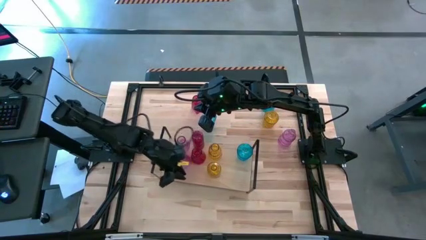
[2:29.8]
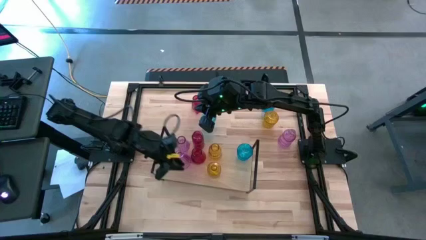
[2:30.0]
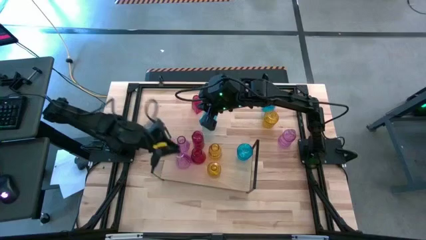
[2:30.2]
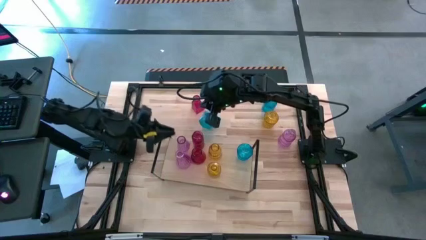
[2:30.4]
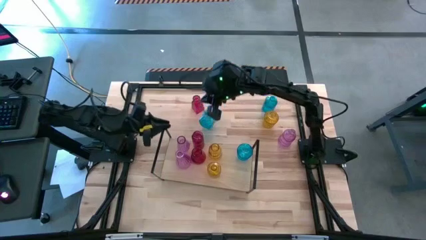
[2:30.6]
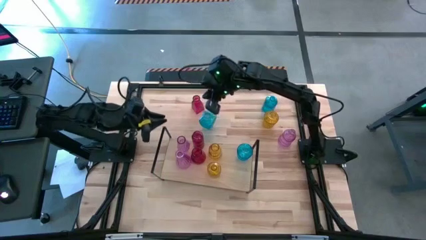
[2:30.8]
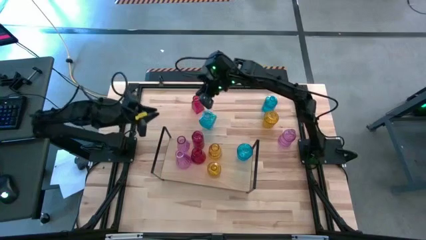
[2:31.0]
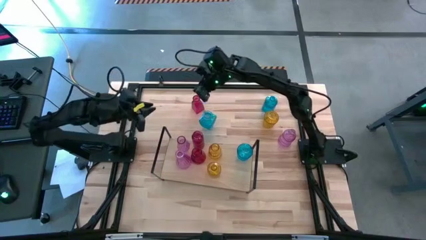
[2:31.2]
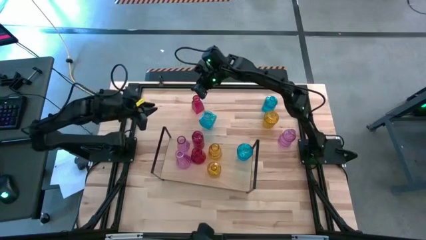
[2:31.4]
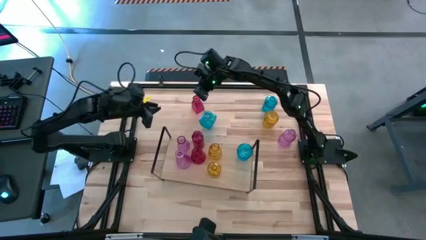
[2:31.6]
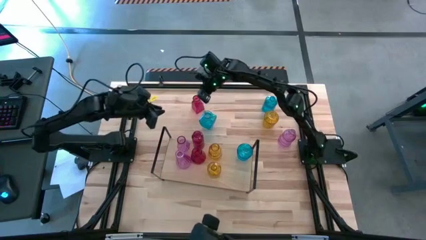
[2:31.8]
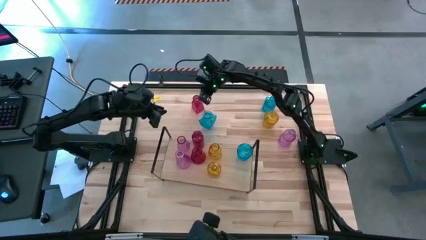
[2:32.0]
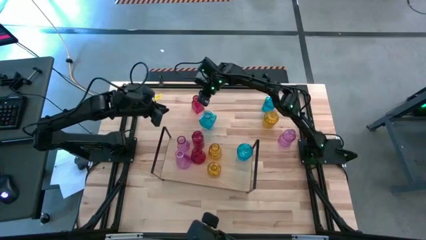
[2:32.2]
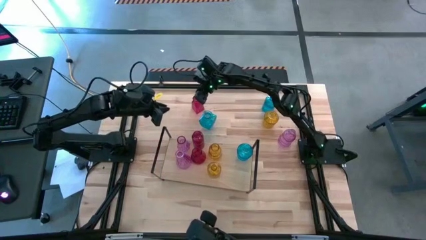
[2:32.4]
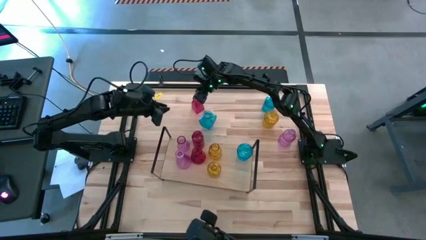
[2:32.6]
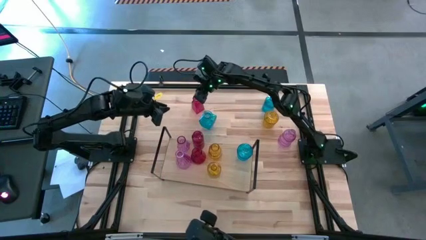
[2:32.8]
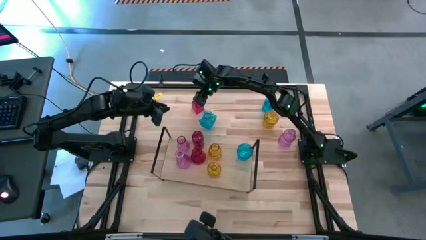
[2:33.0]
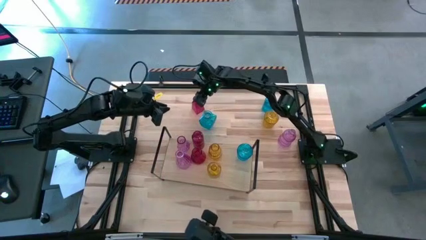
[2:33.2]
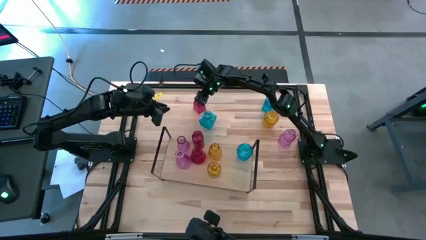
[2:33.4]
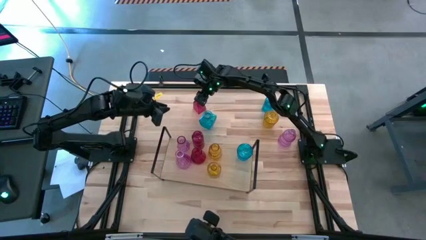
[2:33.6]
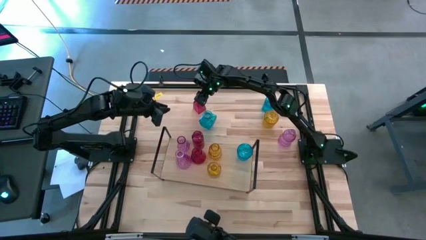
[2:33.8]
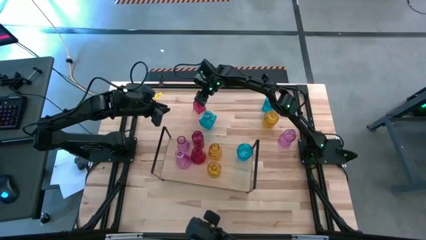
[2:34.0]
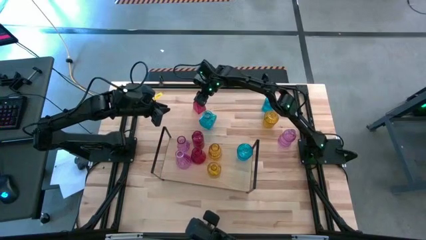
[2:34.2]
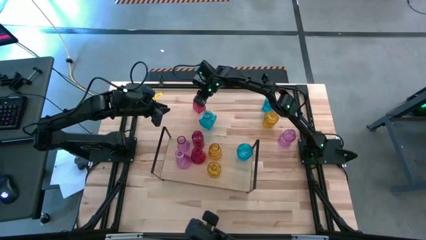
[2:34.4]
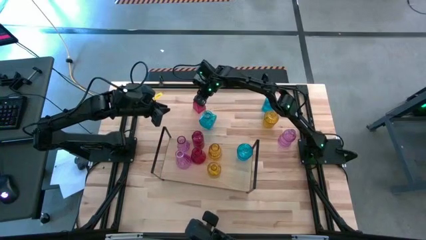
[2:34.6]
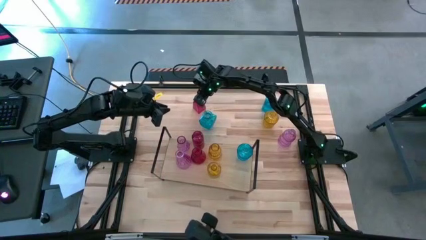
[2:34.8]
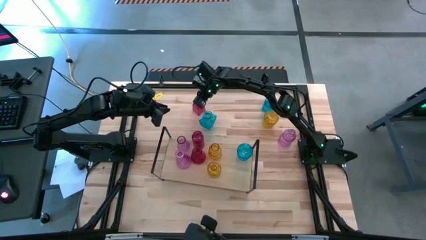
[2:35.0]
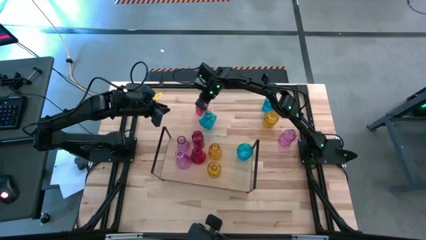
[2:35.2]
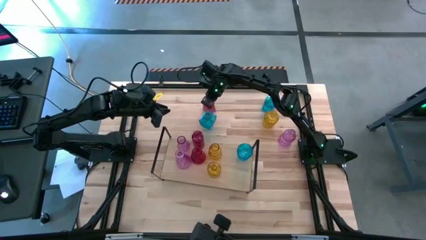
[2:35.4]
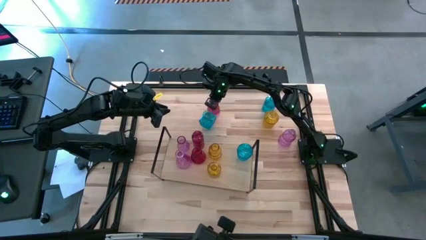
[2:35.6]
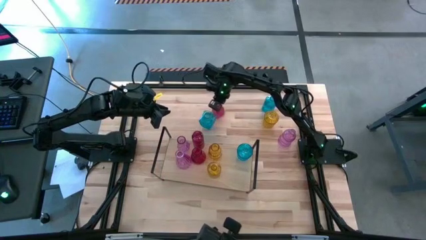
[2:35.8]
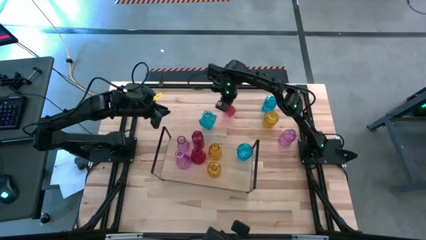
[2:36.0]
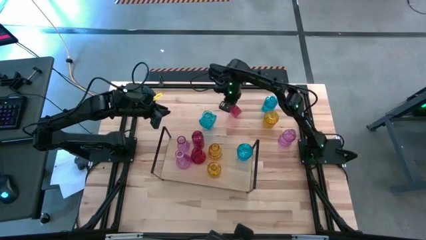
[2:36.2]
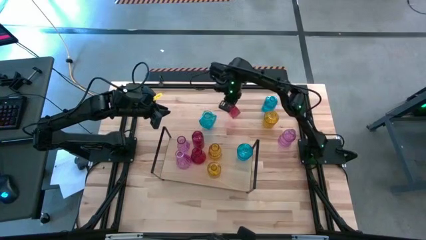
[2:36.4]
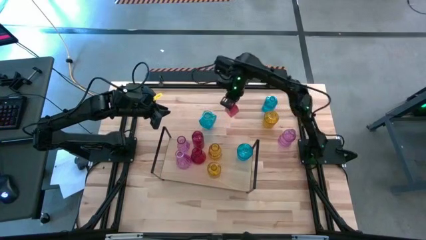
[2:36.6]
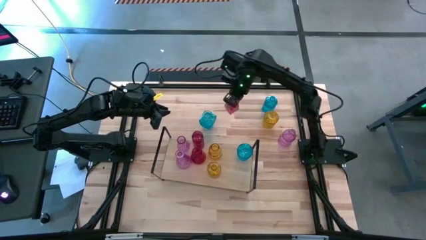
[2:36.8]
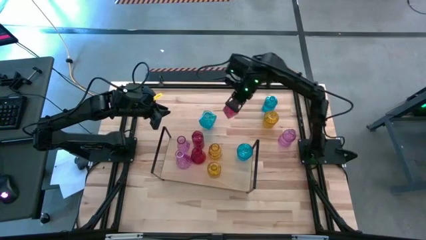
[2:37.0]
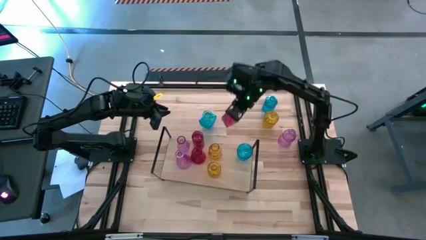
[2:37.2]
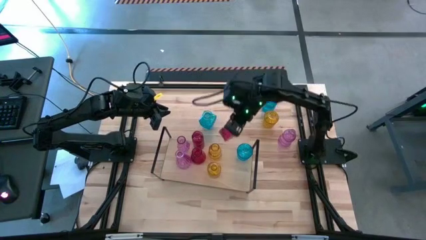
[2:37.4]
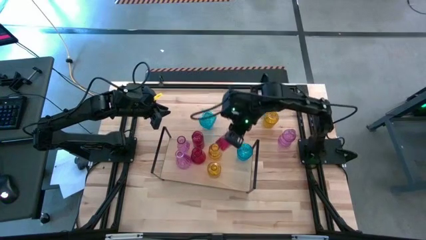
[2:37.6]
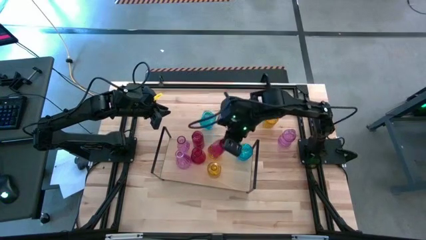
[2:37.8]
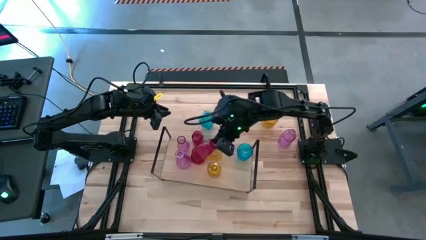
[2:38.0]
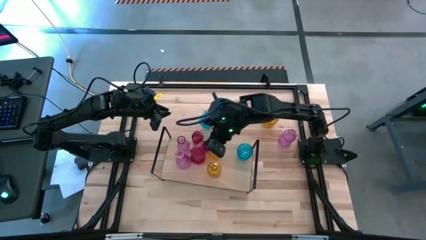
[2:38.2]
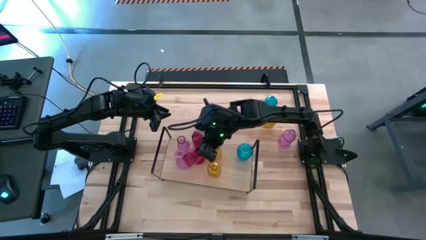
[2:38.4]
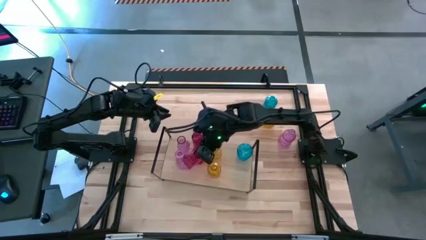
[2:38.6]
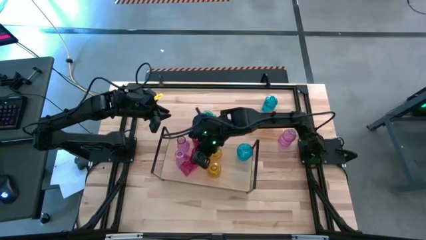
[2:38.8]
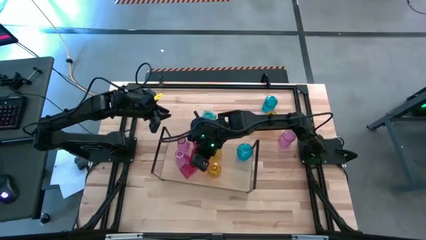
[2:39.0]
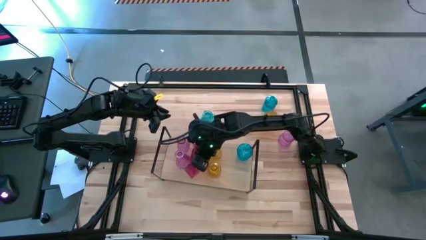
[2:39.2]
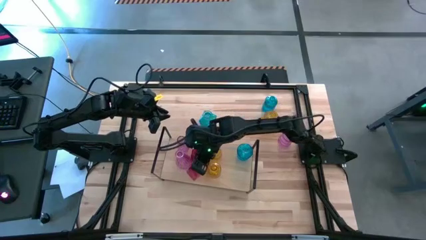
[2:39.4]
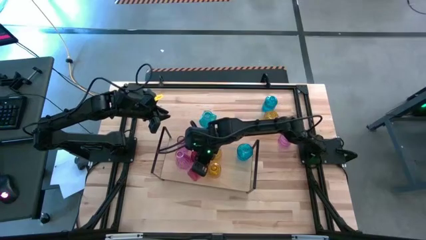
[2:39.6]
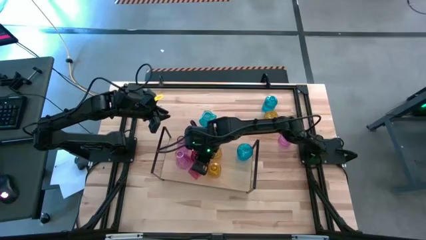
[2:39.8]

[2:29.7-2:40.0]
Task: sort vases onto shelf
Put the red vase on the shelf aligned with the other red vase

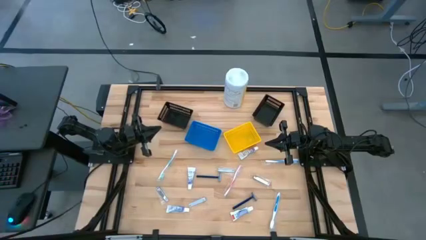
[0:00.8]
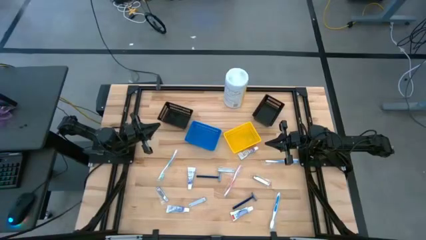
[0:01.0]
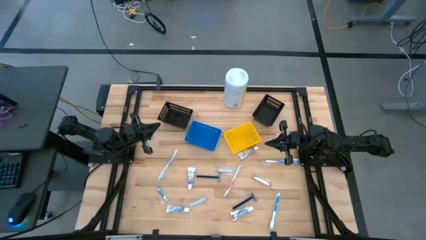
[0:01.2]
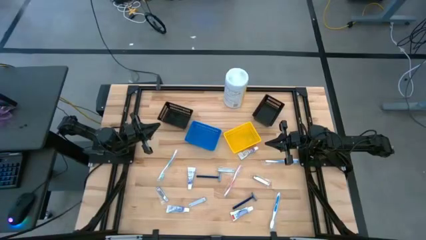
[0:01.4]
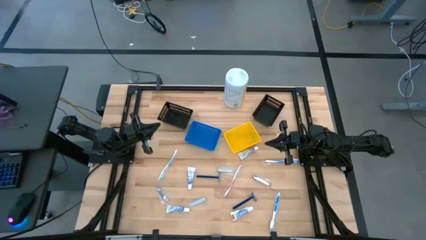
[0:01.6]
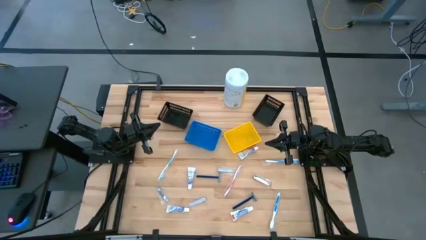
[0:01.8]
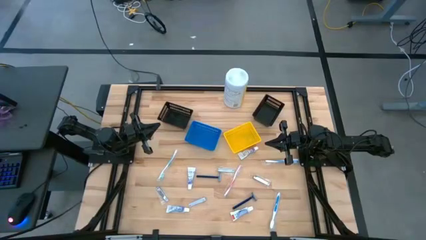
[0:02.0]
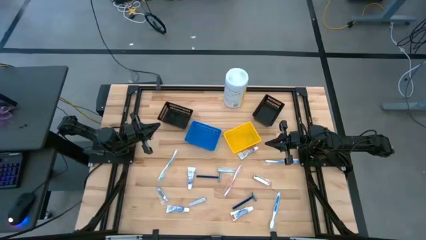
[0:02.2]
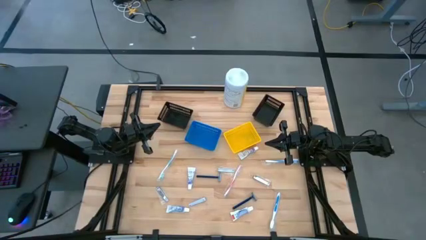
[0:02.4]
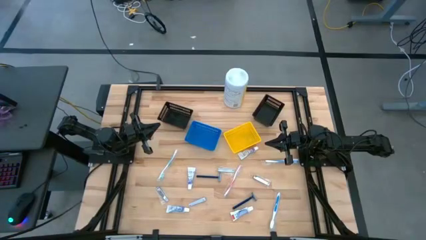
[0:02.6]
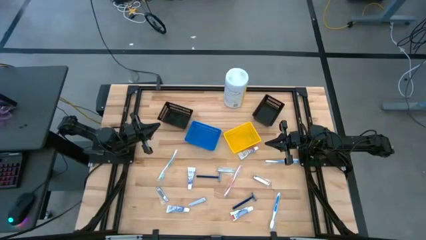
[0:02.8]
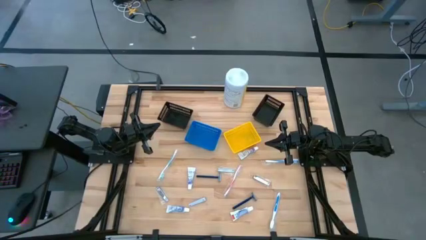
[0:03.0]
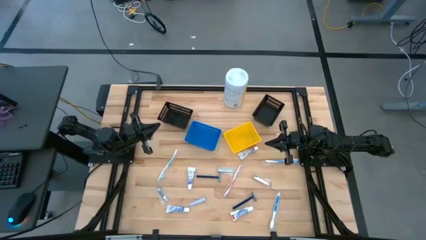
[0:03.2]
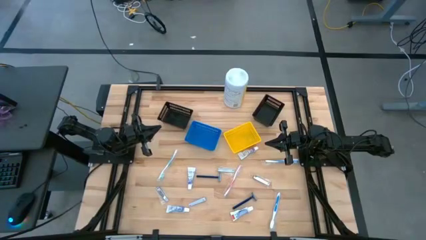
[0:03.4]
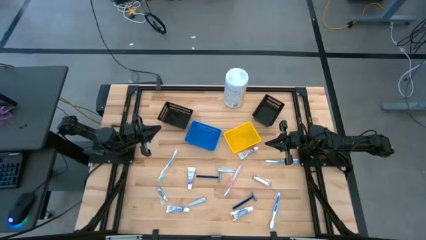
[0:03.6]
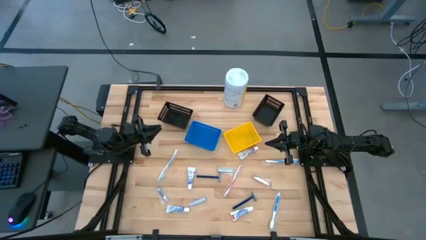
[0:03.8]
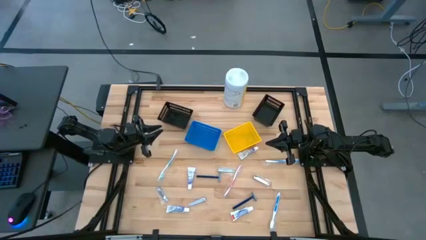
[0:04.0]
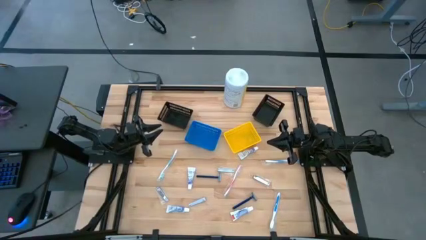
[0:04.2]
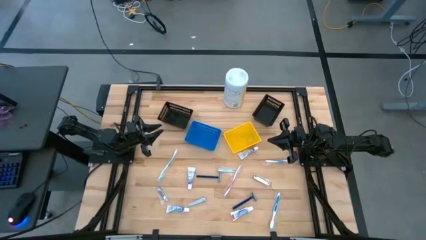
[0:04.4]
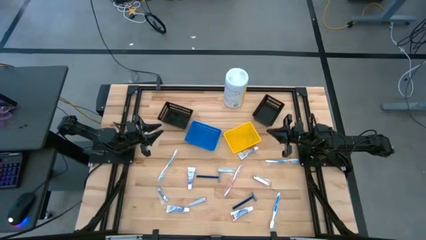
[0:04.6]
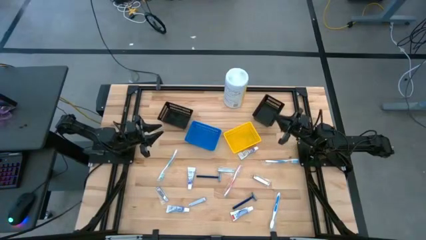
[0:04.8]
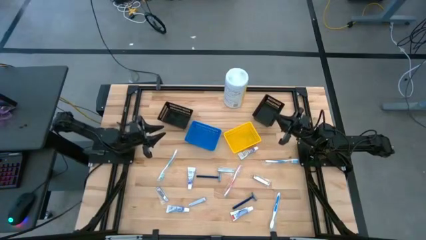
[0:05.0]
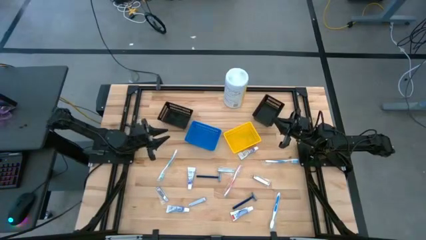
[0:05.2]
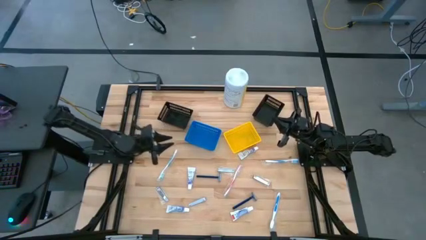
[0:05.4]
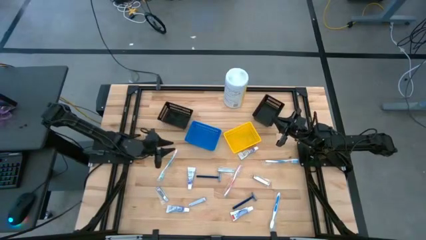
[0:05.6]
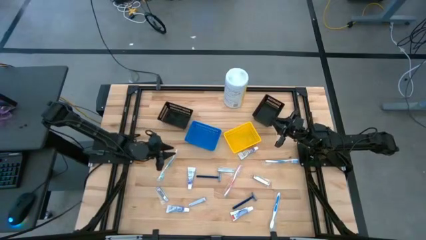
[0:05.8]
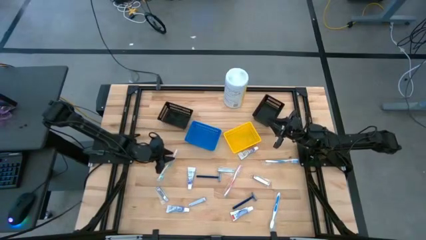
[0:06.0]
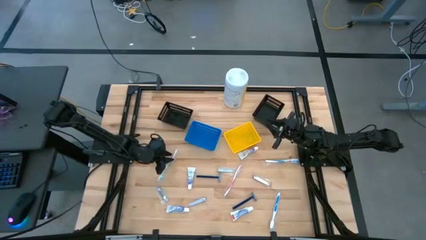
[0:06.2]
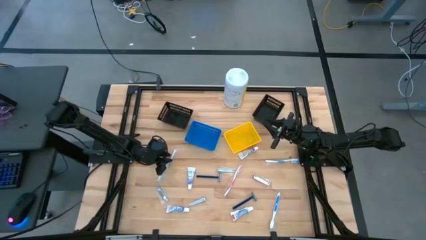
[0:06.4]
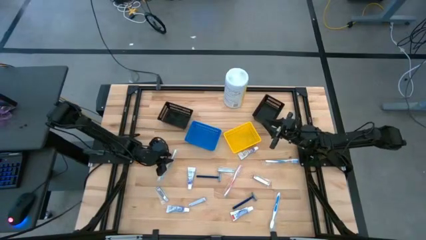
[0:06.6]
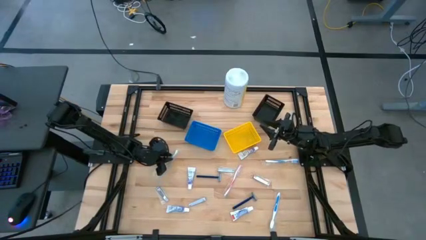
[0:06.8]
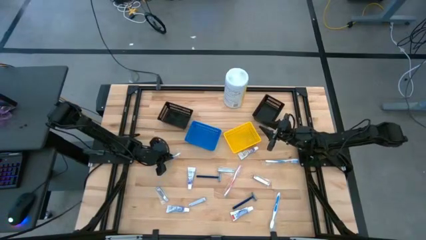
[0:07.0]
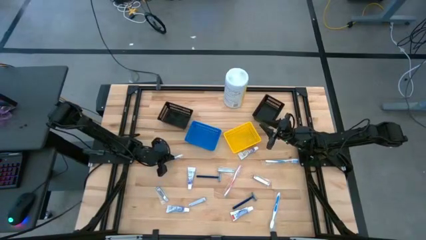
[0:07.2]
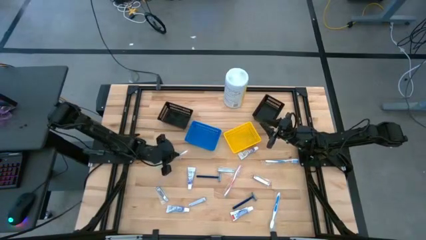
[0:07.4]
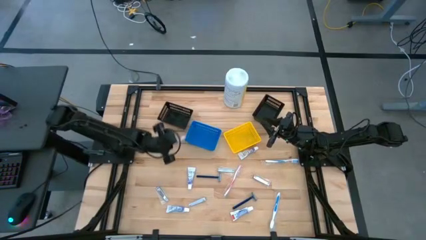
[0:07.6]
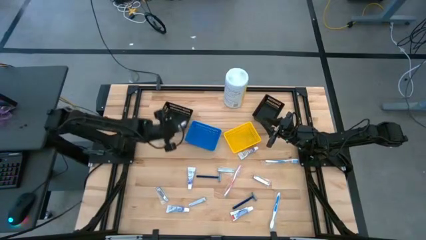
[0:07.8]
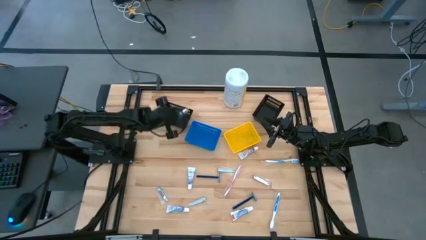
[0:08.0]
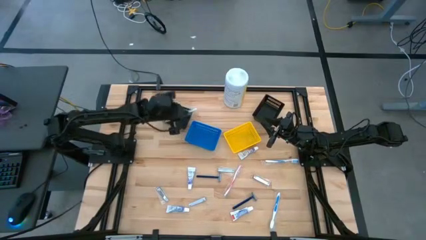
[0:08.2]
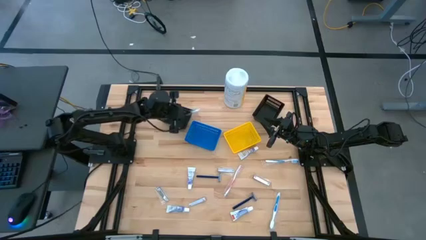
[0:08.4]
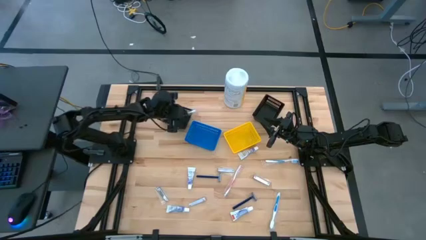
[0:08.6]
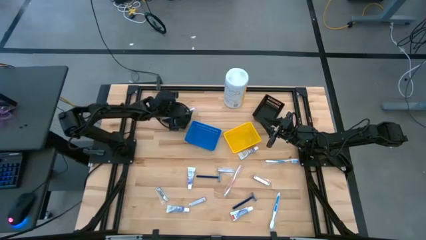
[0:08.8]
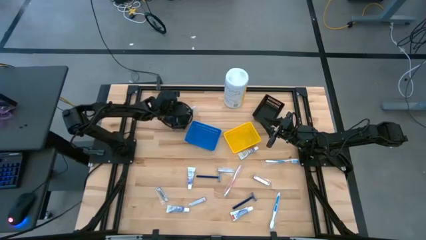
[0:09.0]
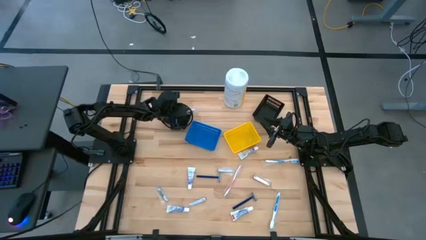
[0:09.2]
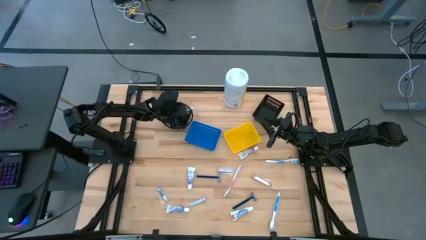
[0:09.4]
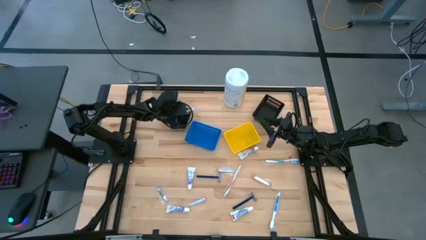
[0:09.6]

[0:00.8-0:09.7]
Task: Pick & Place Travel size toiletries
Put the green toothbrush into the left black bin
